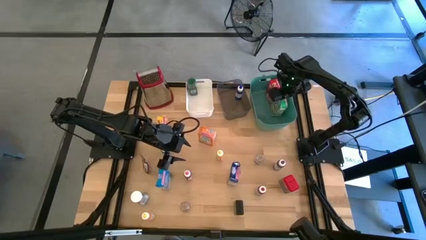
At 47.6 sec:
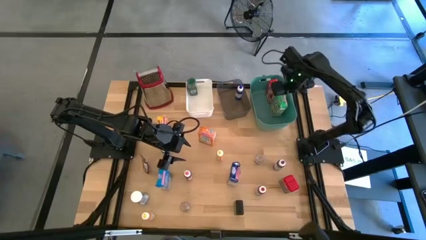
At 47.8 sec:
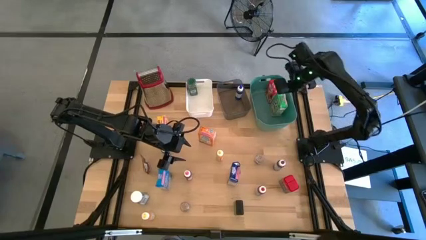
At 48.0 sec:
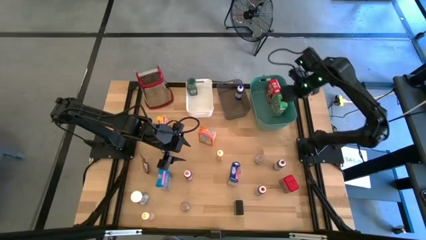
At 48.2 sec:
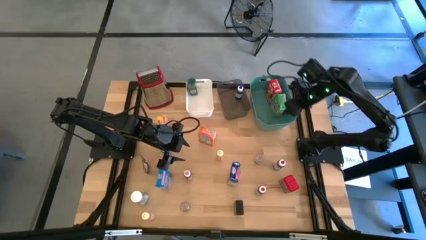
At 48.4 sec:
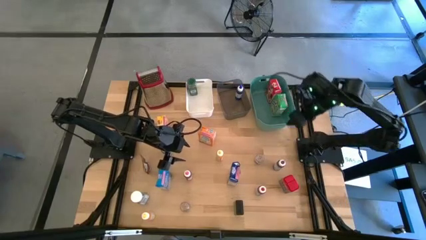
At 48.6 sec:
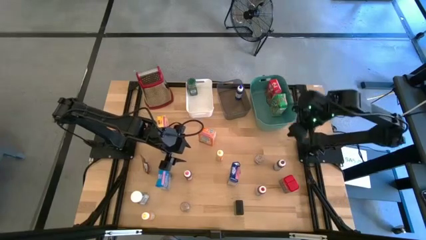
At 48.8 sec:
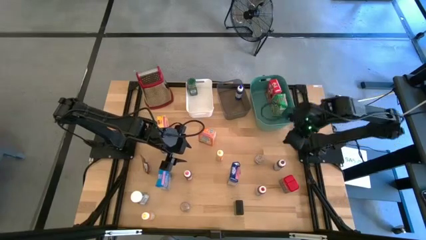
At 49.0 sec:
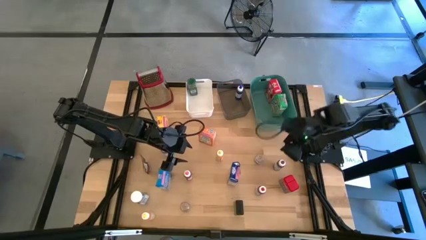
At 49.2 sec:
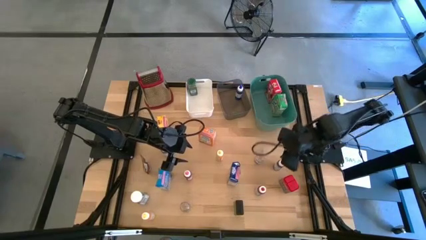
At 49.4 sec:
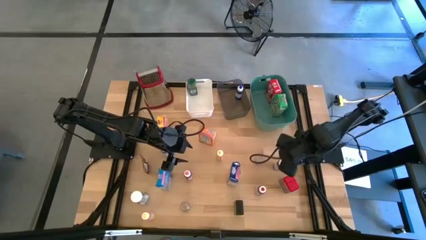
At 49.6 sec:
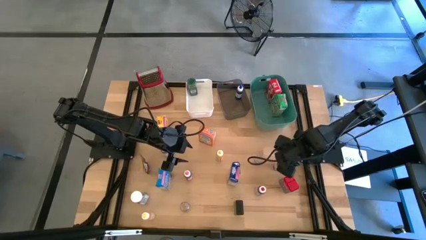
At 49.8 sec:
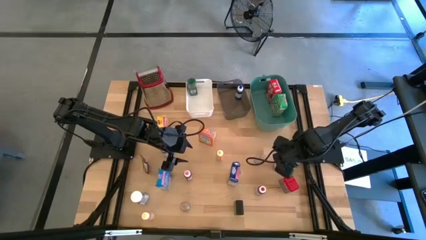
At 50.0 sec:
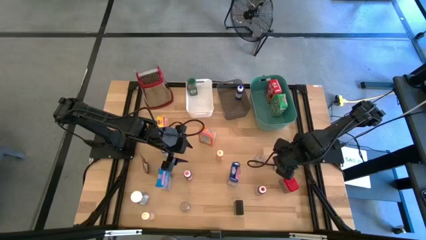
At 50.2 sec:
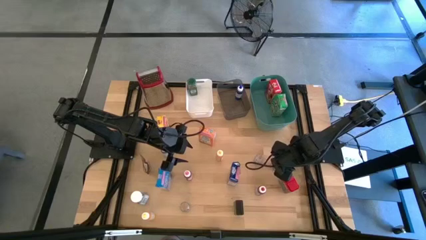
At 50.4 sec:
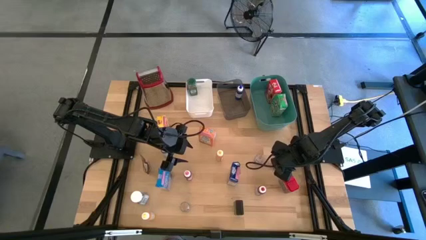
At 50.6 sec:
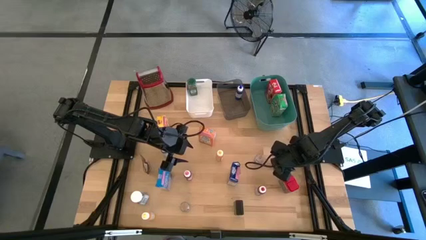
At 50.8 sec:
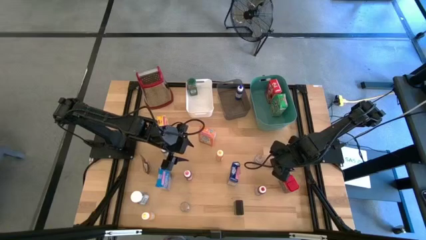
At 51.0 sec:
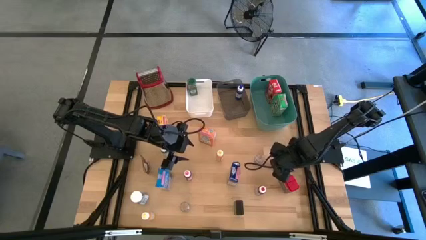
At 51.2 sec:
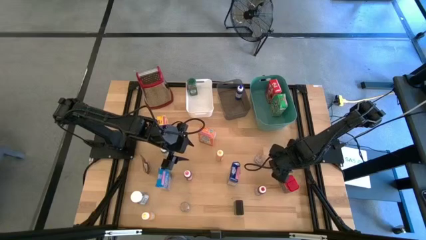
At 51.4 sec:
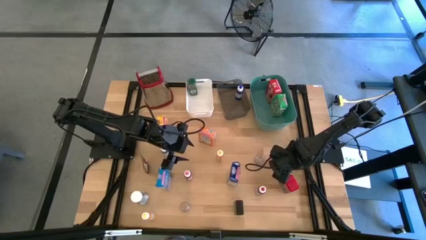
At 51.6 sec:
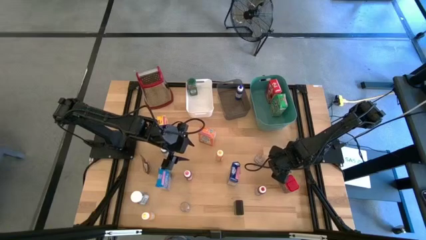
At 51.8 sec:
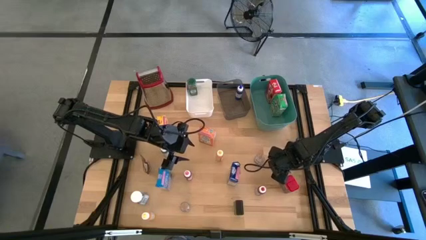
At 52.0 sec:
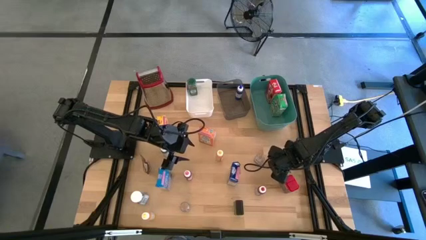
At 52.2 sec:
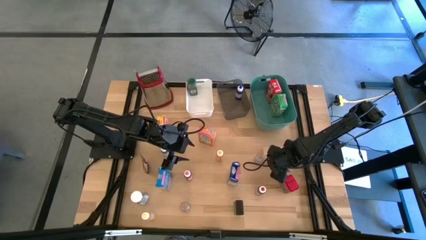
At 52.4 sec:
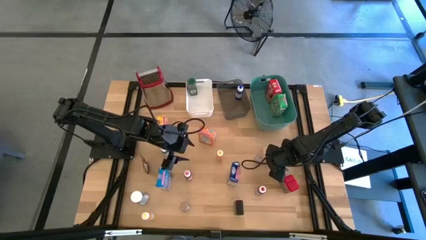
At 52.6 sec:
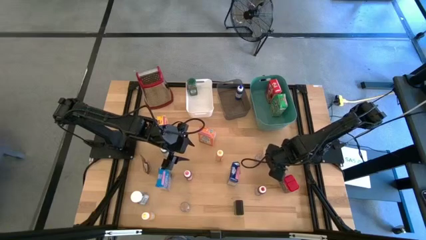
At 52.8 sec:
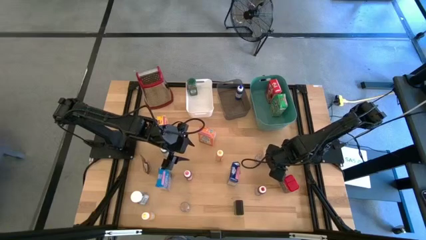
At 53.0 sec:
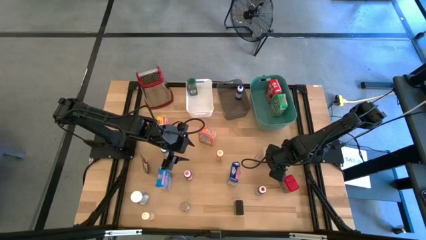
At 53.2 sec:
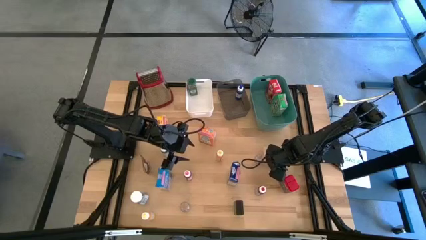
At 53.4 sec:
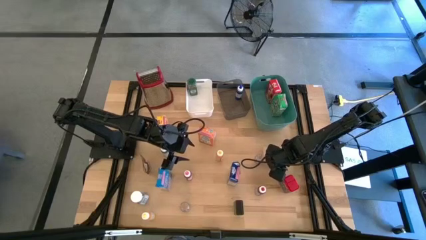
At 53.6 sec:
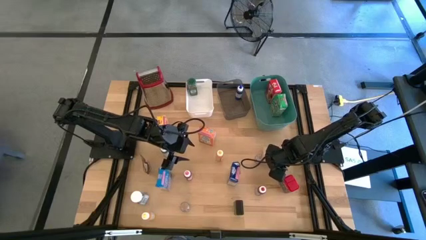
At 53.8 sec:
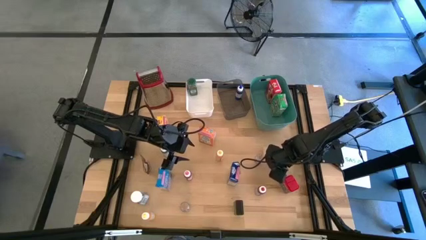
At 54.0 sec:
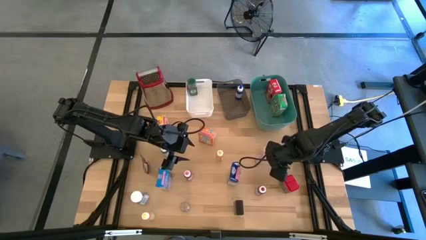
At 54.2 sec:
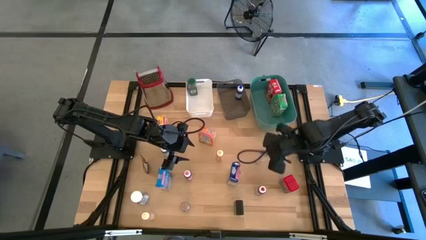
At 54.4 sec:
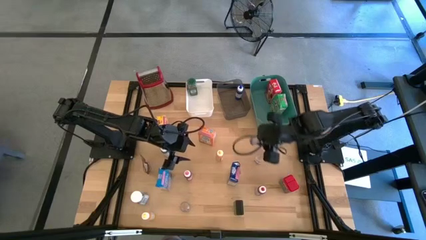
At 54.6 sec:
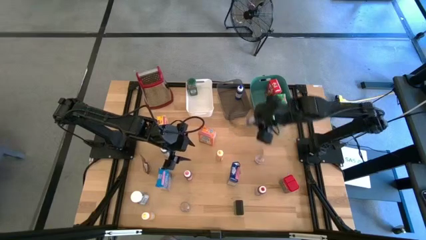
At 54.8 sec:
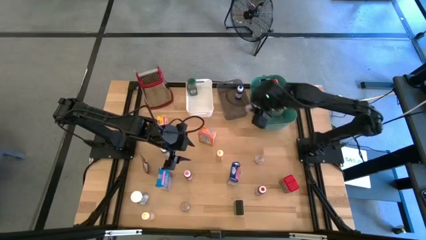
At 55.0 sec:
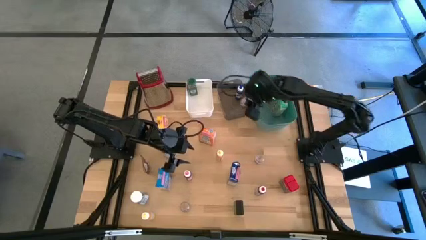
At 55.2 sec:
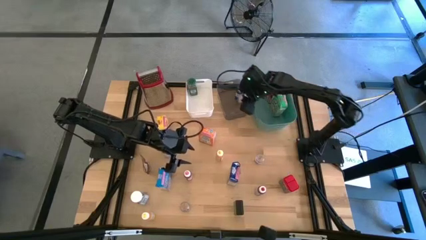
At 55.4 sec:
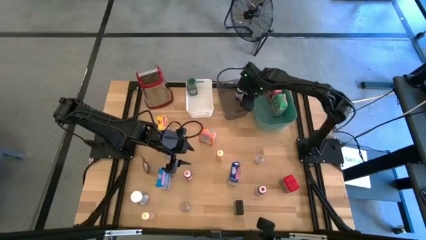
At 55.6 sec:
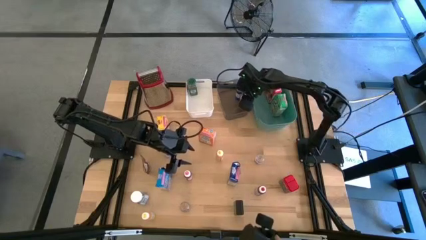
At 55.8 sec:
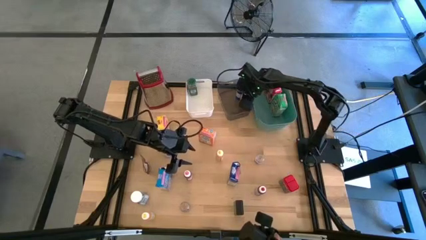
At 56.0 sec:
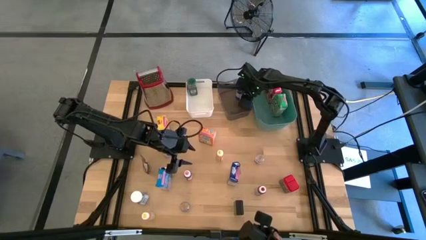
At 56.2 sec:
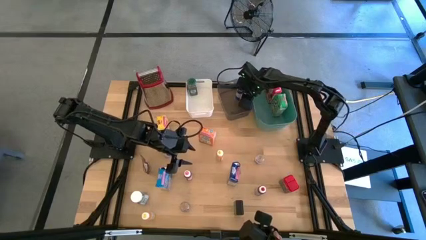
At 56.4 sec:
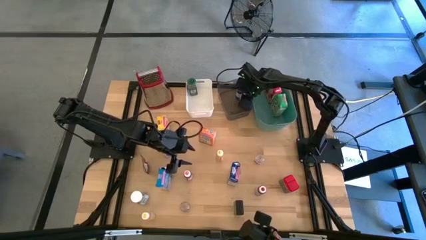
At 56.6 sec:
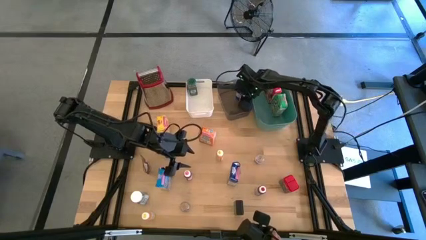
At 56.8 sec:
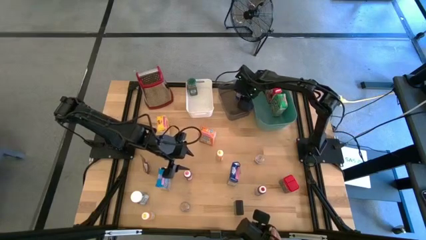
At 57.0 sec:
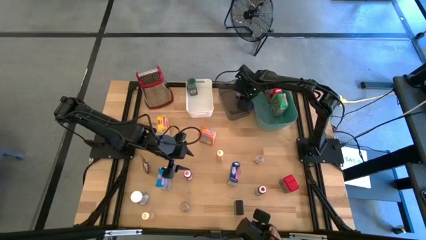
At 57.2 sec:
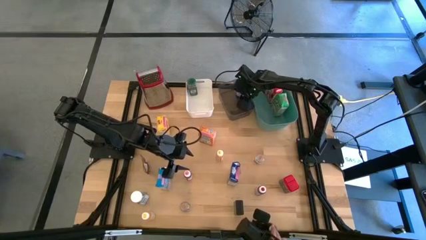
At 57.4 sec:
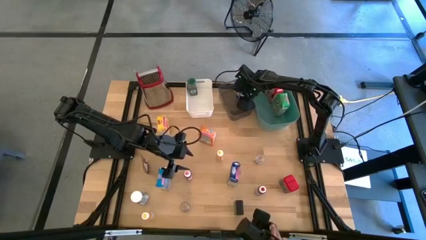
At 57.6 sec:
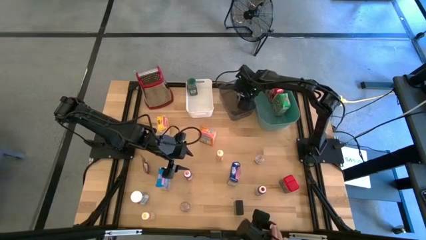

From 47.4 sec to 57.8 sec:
Task: Pick & Place Kitchen Items
Put the purple food coloring bottle into the black bin

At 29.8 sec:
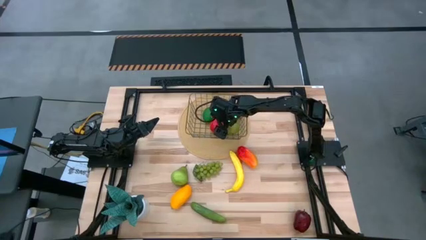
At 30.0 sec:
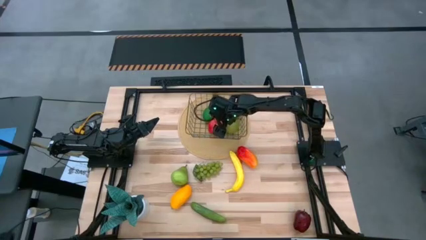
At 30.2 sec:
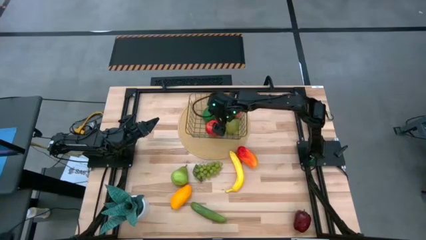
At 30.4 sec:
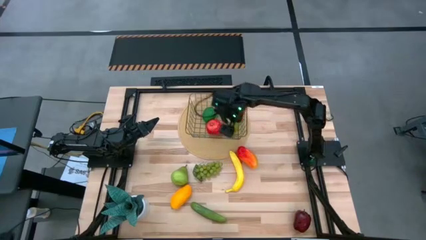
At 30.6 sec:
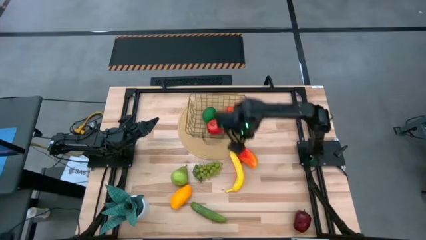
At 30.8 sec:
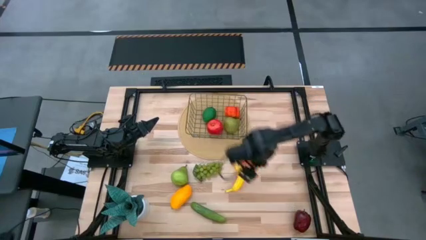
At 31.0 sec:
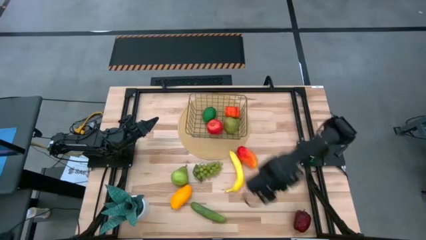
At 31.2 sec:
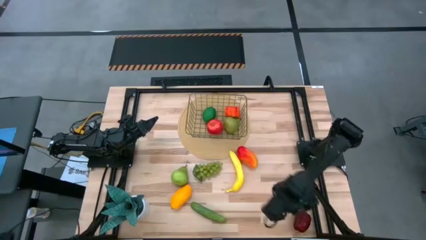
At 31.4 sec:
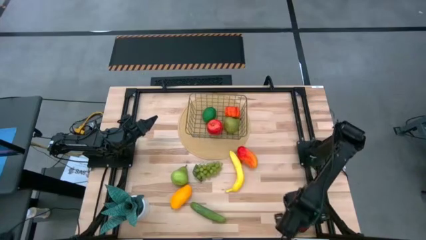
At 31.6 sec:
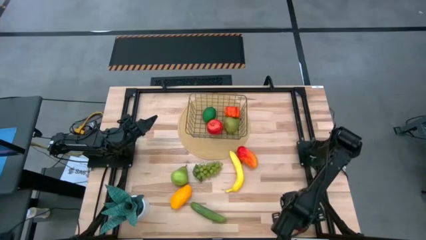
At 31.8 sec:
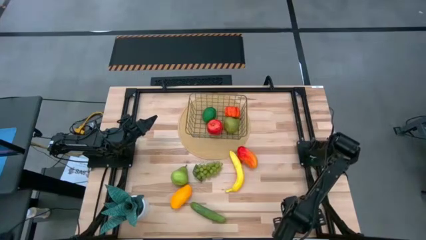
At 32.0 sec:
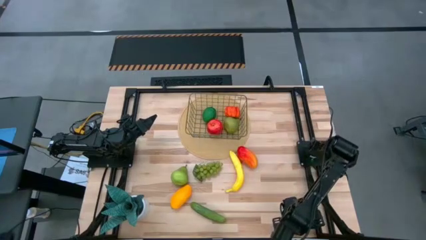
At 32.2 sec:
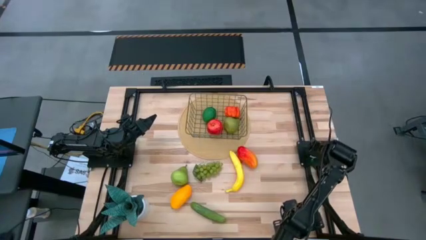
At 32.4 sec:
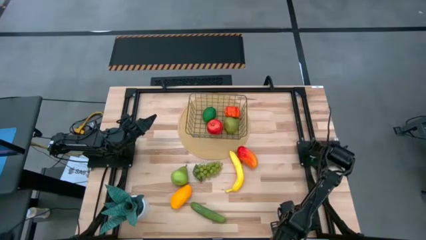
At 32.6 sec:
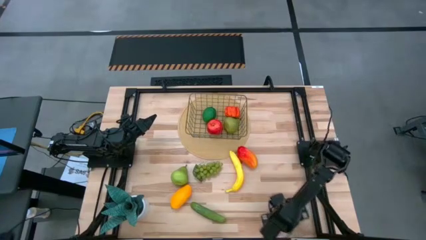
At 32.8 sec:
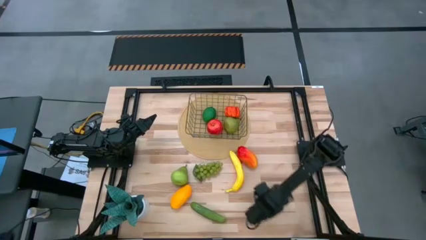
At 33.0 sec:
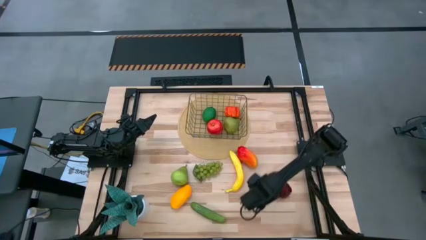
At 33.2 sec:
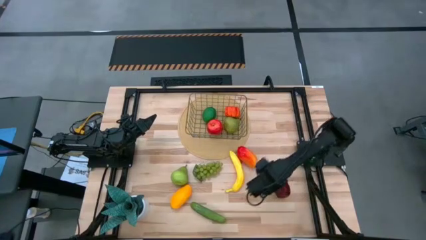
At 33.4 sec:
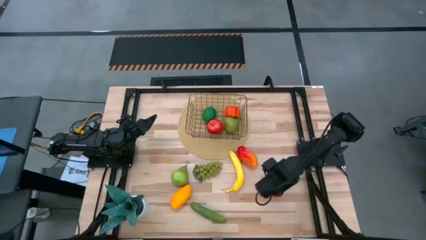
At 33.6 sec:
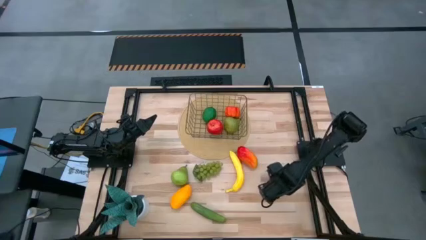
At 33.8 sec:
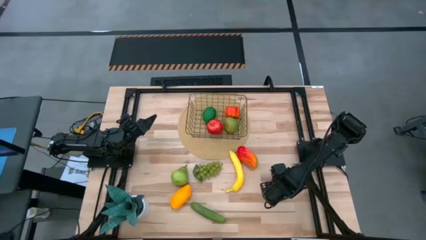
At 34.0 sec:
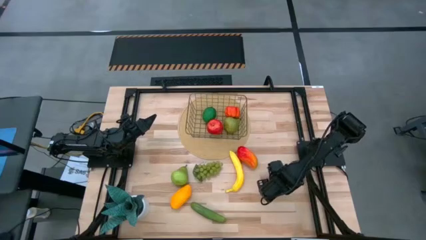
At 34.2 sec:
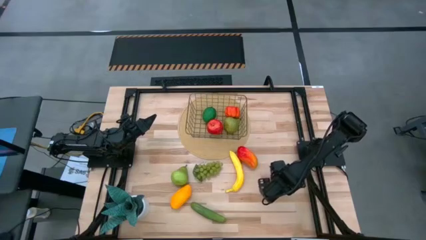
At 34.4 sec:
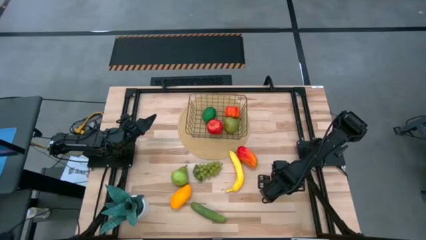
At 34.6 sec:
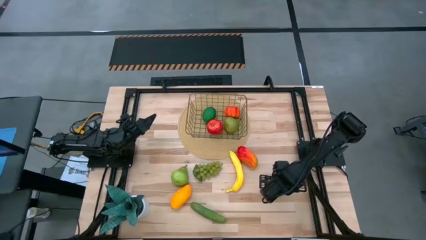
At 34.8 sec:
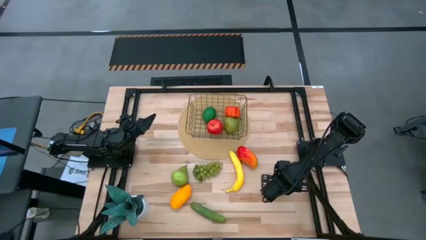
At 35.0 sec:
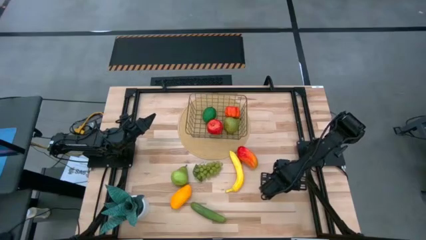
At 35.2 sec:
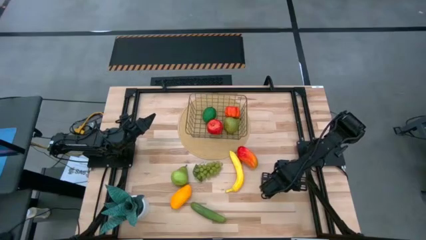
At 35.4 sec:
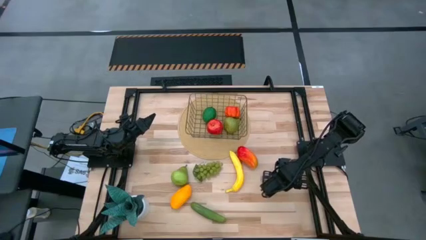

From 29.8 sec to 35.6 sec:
Task: Build produce basket
Put the dark red apple into the wire basket

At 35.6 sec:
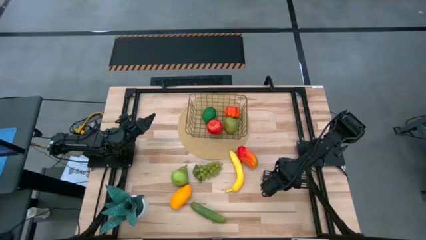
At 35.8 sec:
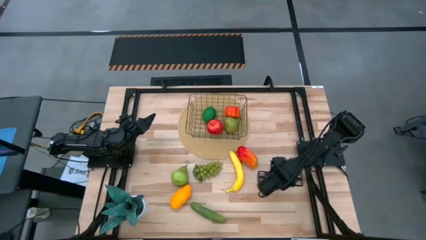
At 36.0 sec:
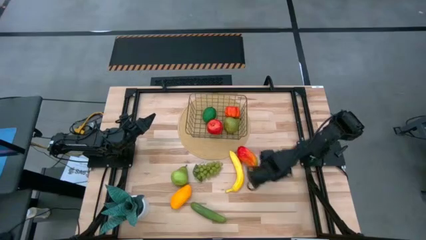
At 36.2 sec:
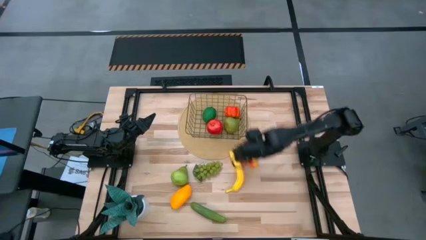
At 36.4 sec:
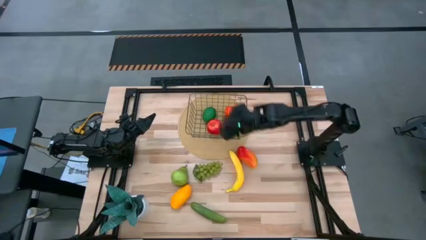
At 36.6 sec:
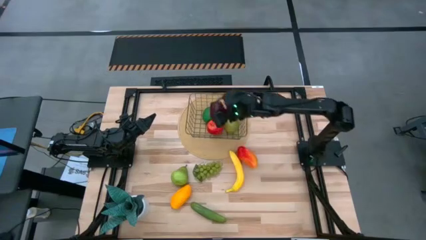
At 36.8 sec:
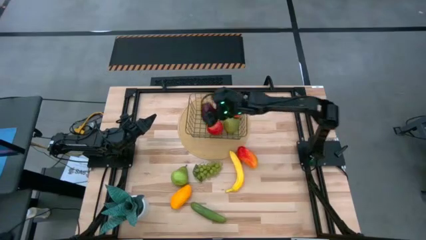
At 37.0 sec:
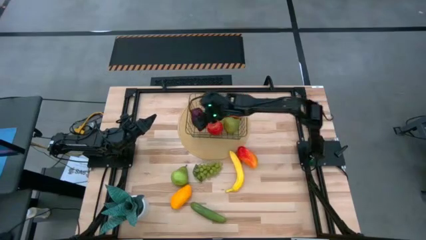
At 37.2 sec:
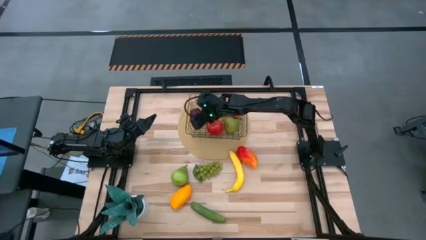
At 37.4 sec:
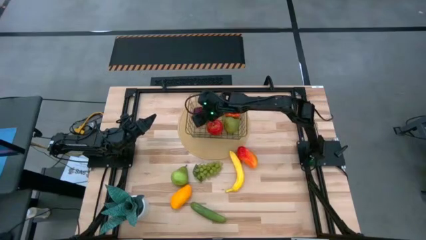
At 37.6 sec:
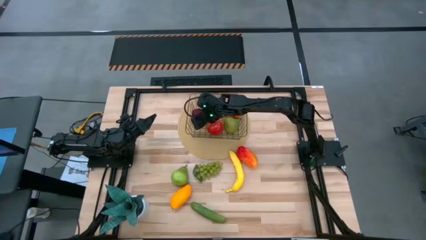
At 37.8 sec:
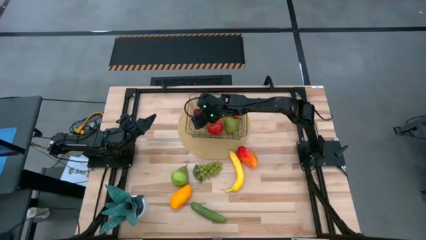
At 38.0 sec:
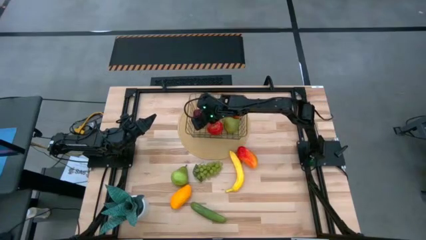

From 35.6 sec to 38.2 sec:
Put the dark red apple into the wire basket
